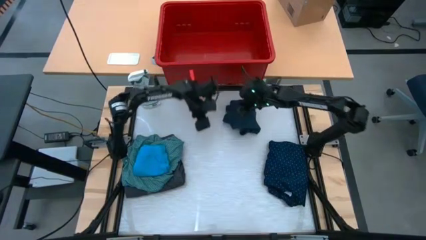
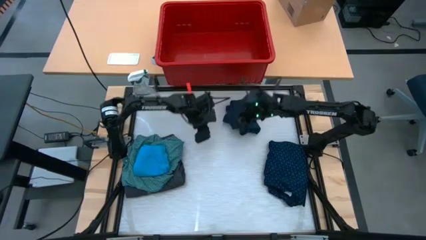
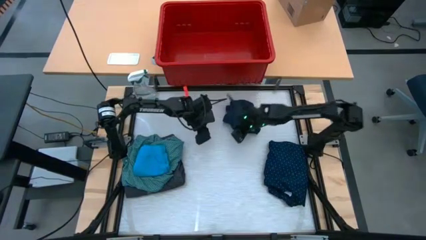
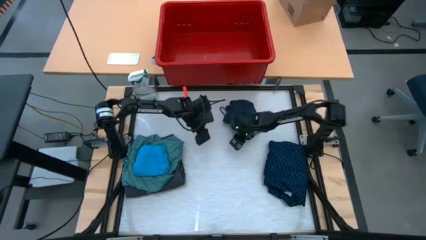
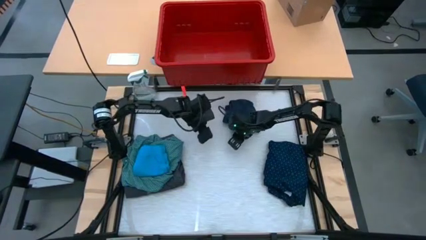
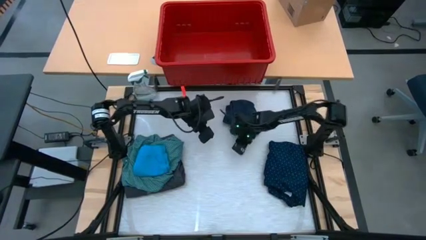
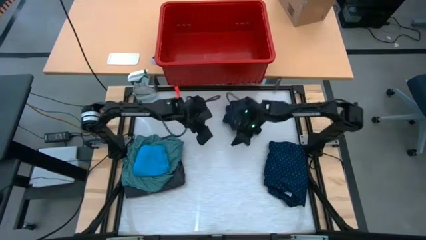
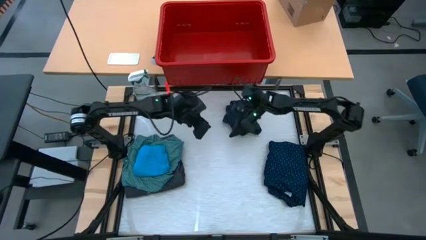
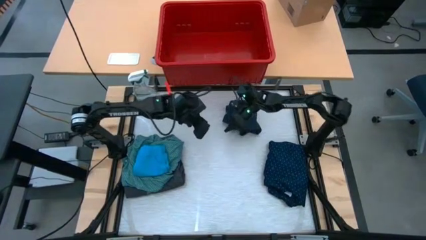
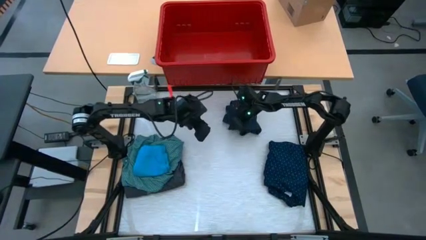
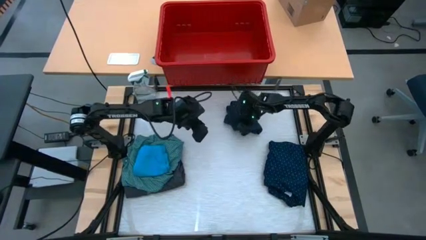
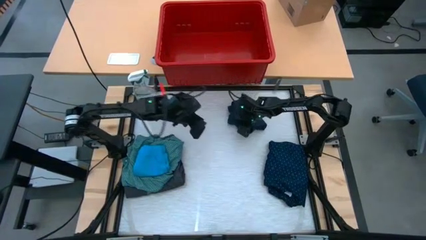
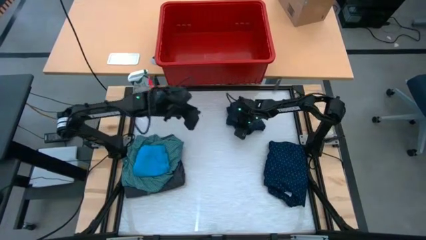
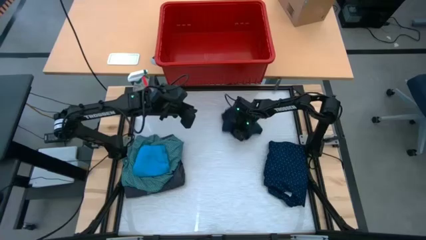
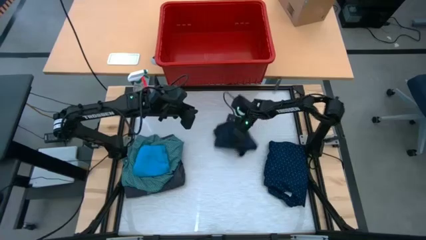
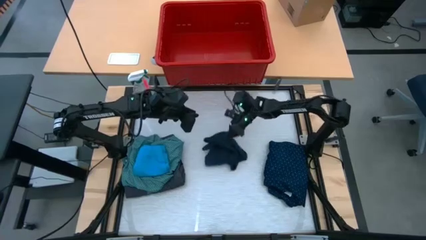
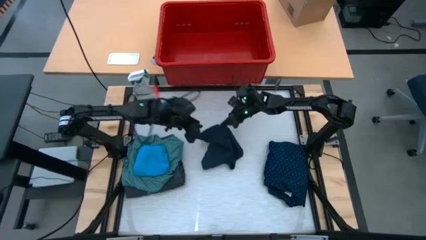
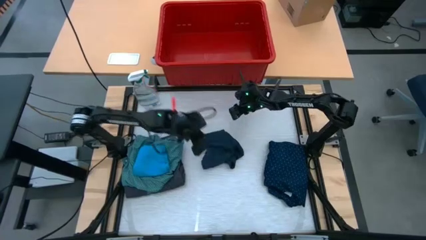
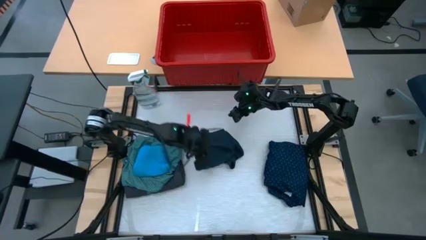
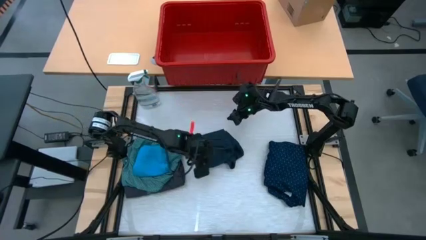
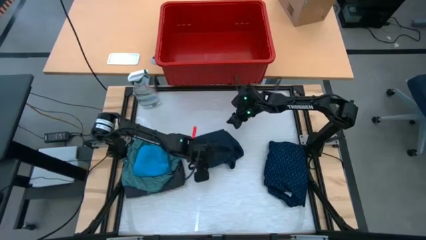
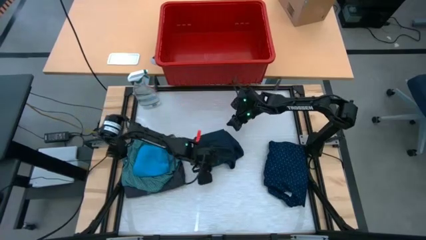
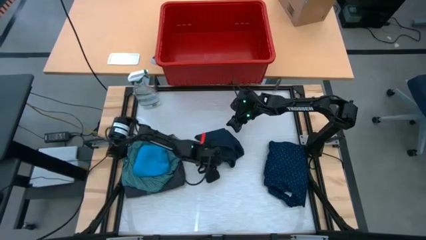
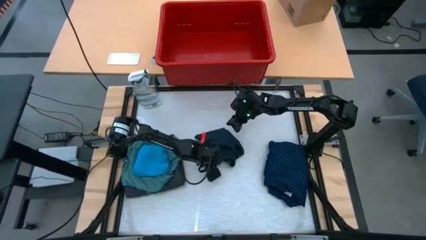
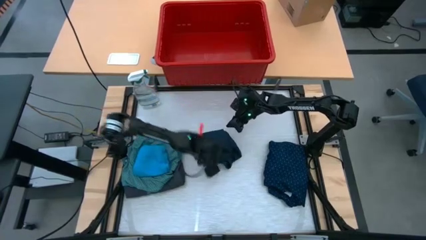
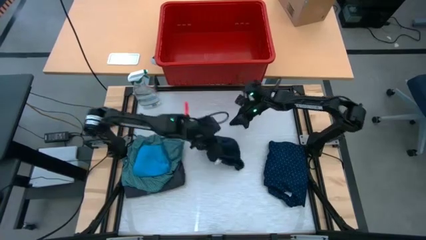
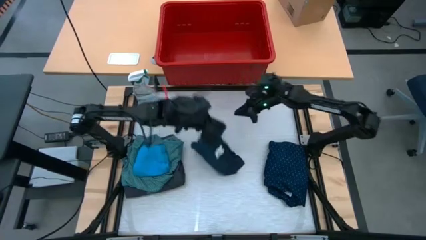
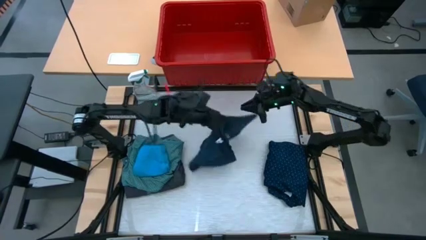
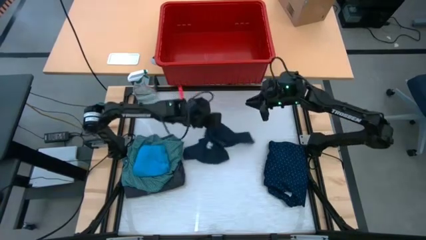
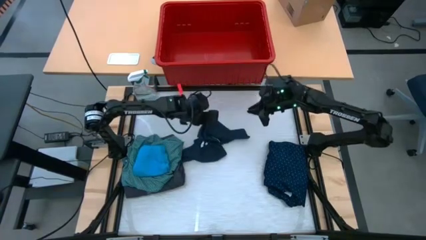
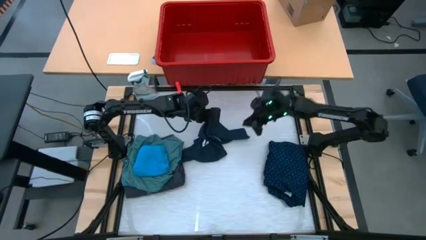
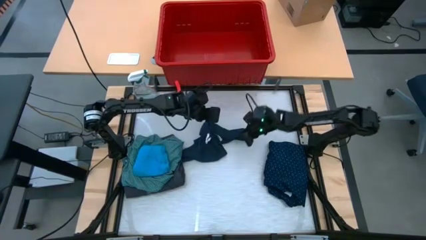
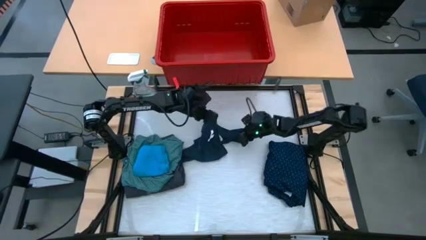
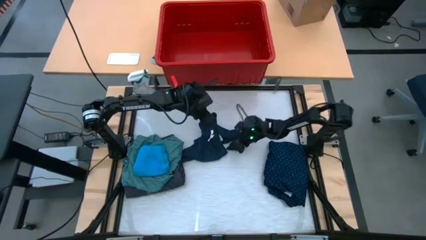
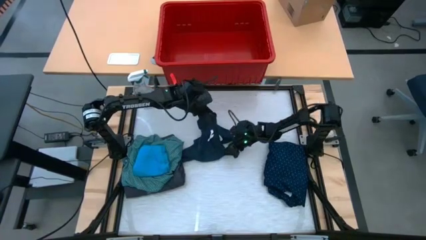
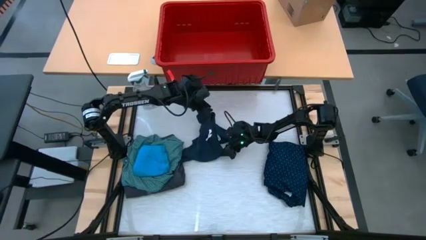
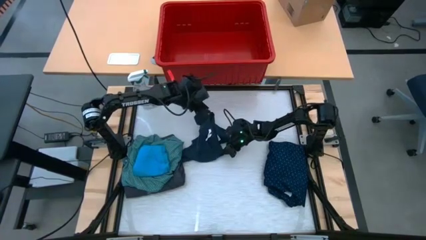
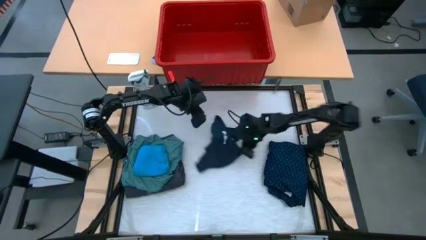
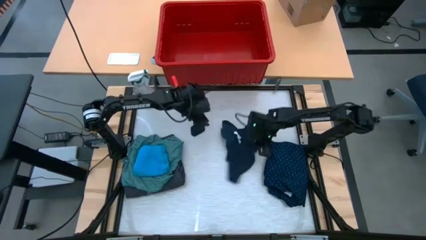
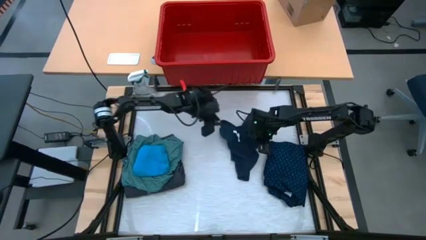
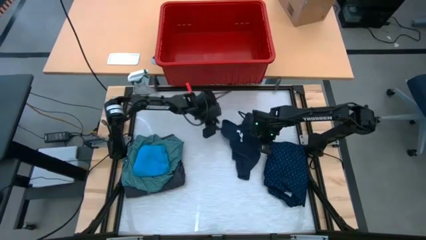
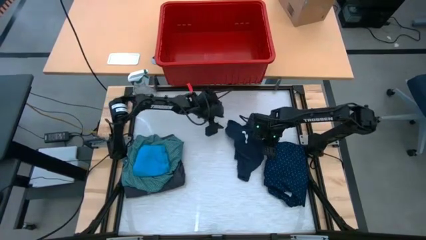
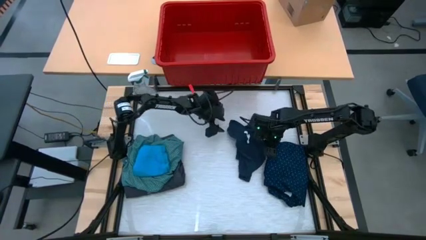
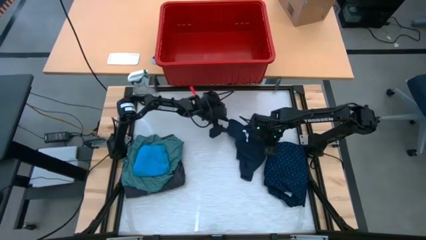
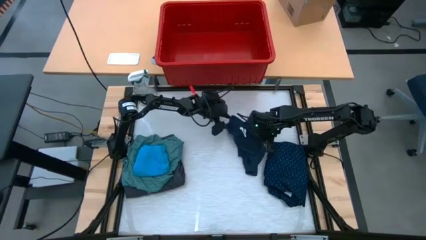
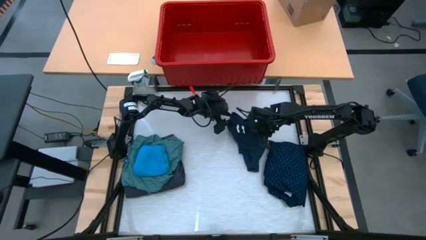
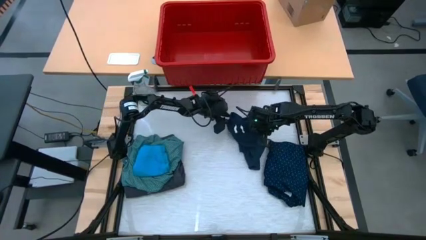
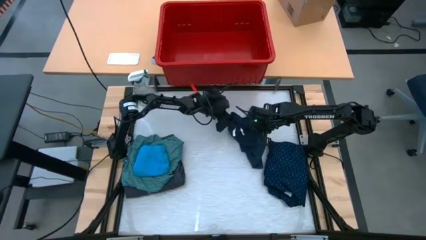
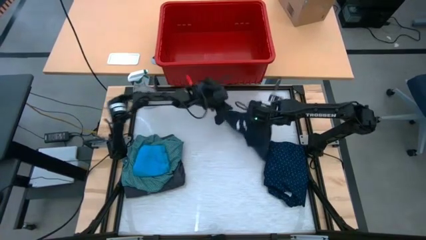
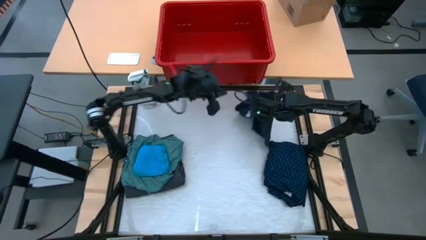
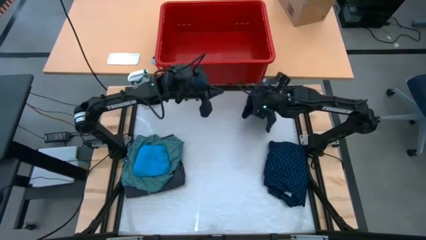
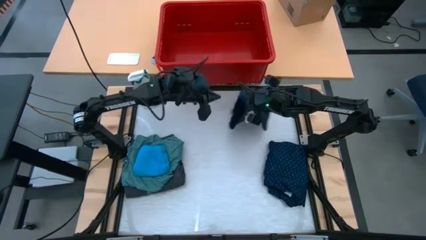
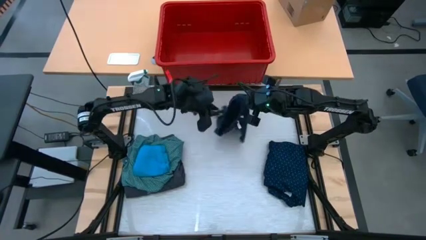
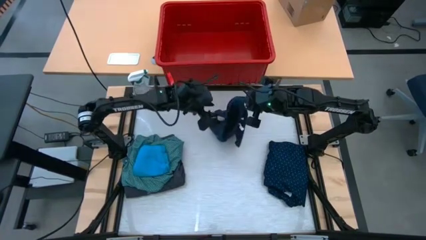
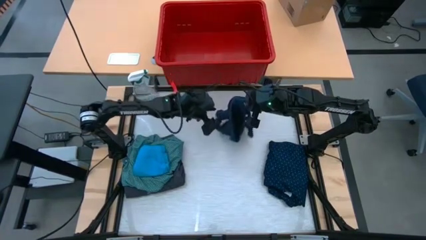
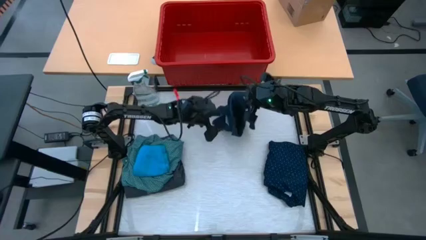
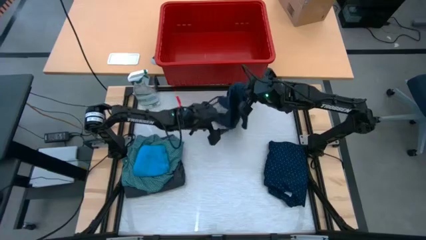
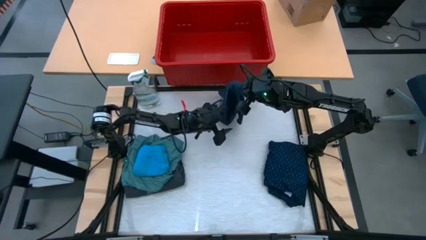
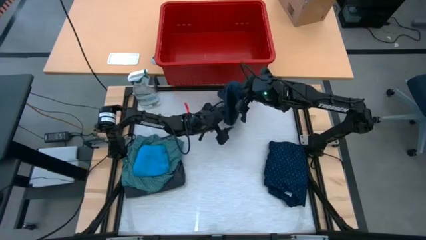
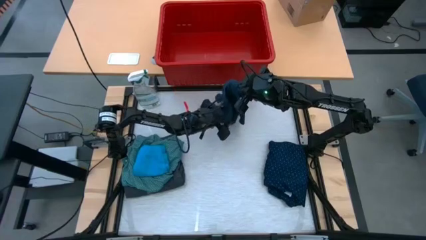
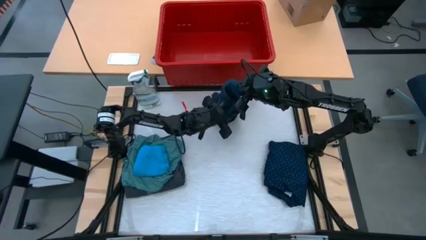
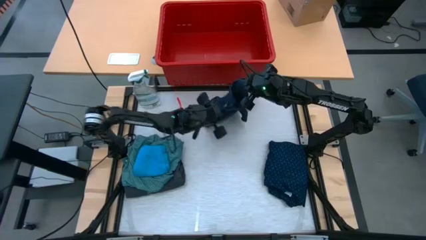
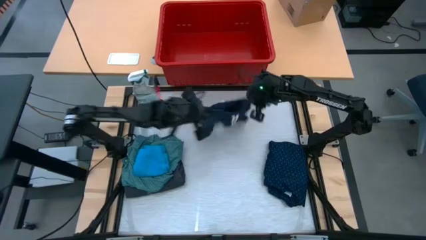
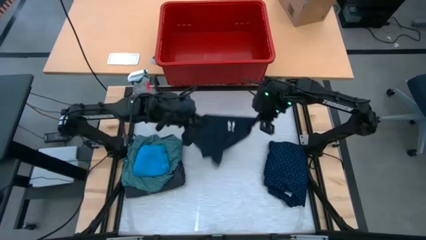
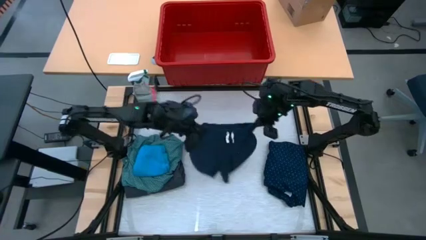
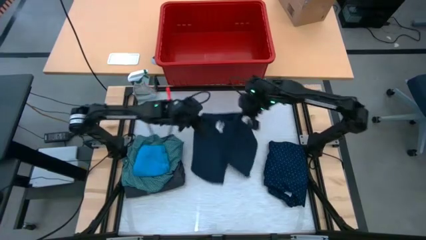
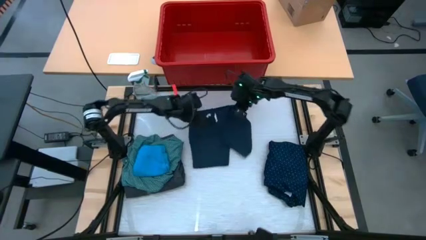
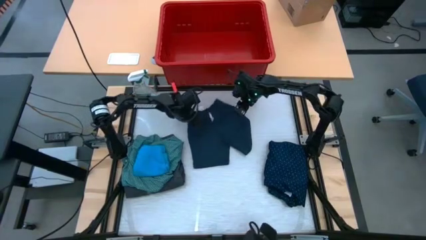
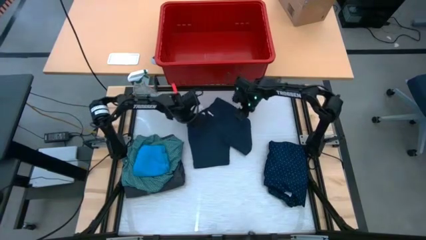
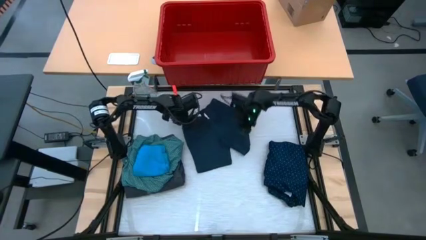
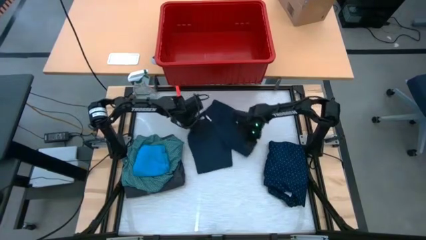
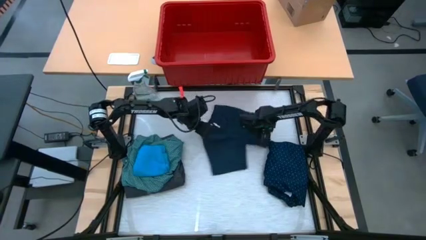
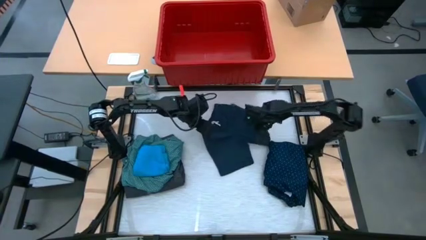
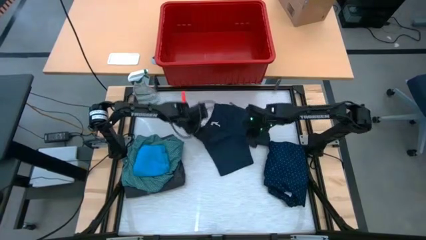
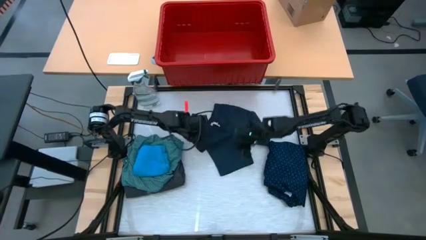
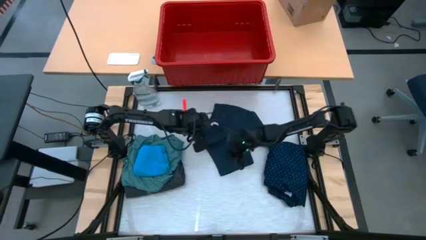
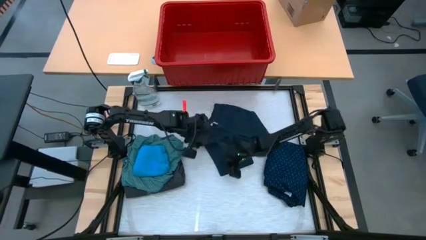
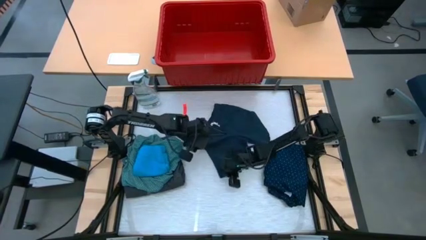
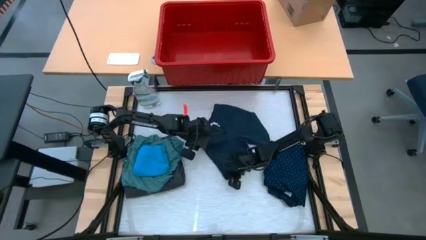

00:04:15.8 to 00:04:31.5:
Task: Fold laundry
Fold the dark blue shorts
